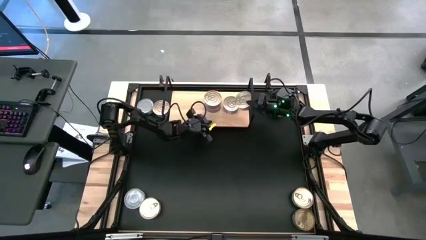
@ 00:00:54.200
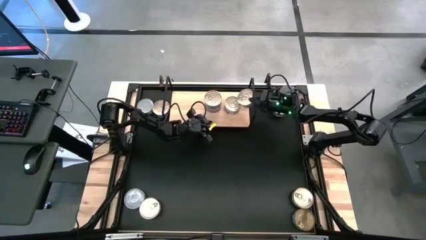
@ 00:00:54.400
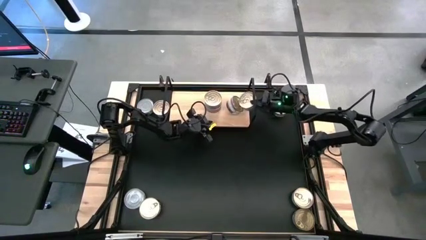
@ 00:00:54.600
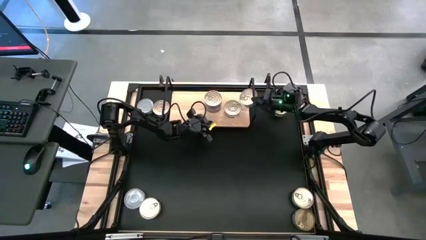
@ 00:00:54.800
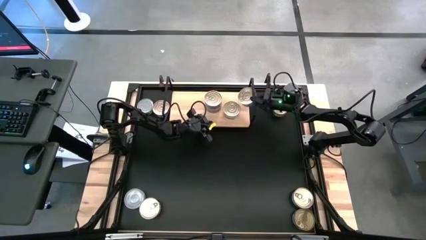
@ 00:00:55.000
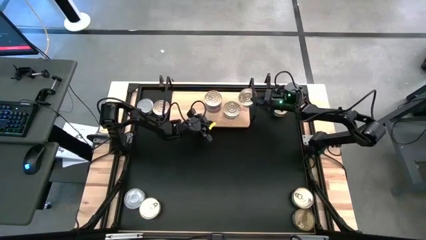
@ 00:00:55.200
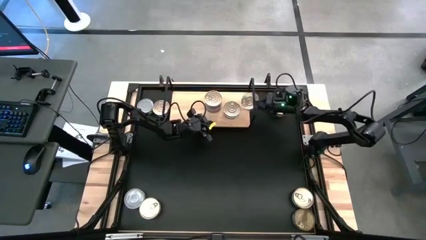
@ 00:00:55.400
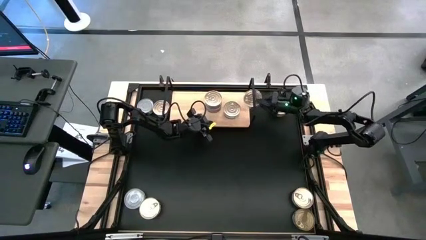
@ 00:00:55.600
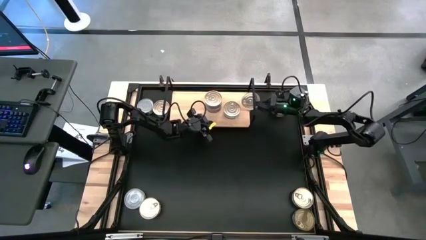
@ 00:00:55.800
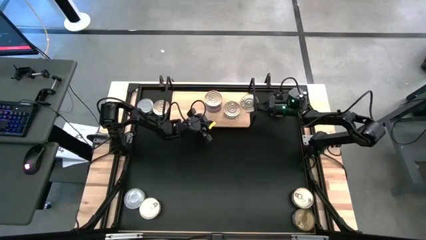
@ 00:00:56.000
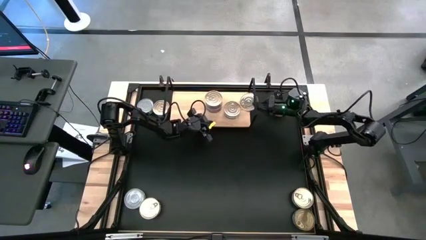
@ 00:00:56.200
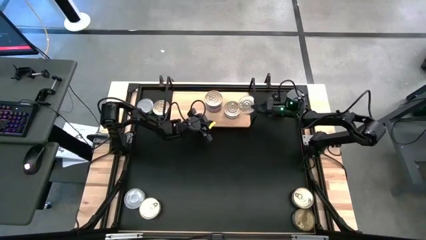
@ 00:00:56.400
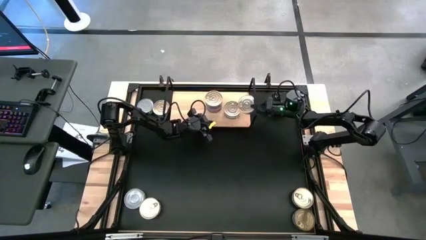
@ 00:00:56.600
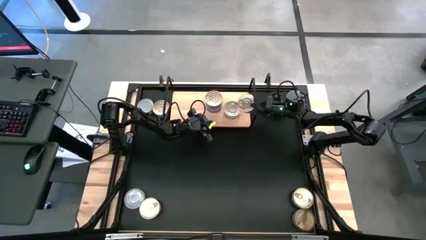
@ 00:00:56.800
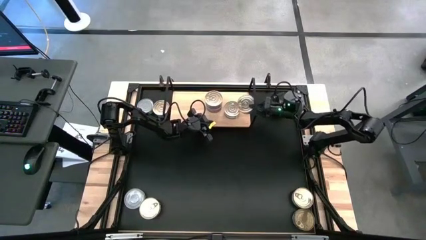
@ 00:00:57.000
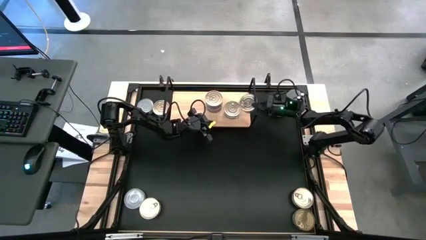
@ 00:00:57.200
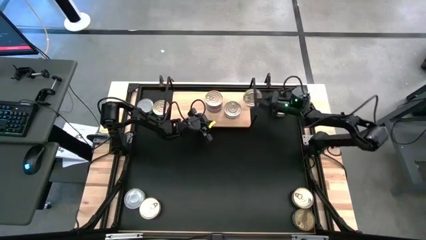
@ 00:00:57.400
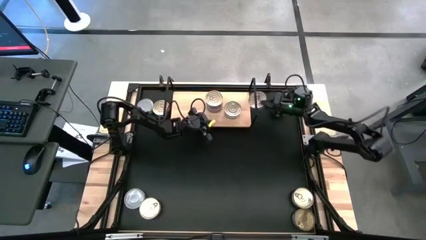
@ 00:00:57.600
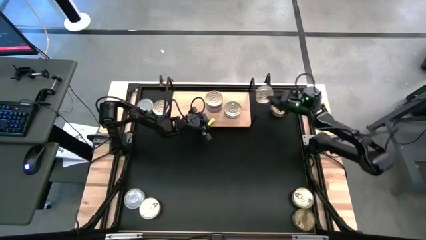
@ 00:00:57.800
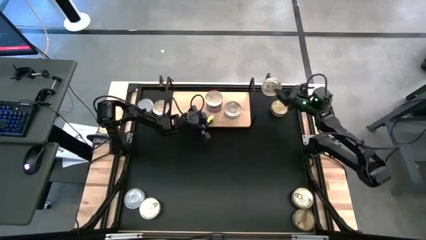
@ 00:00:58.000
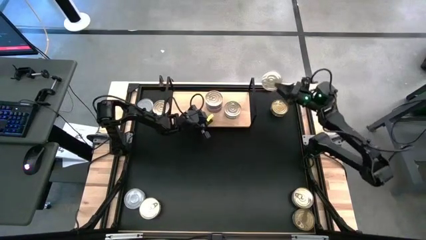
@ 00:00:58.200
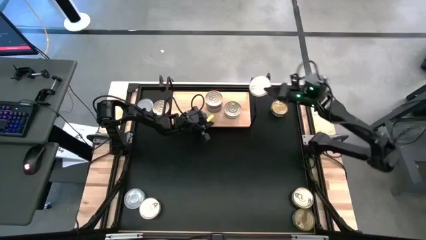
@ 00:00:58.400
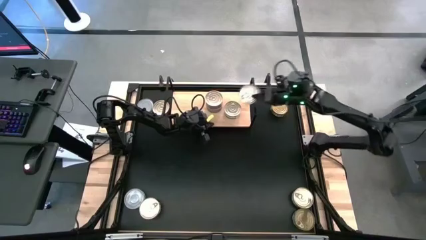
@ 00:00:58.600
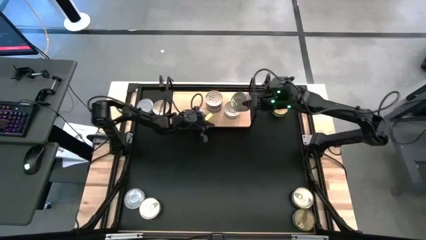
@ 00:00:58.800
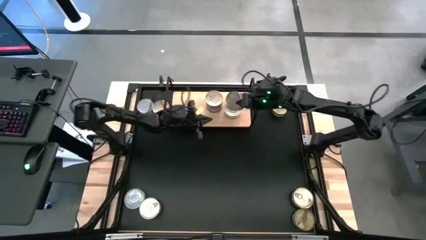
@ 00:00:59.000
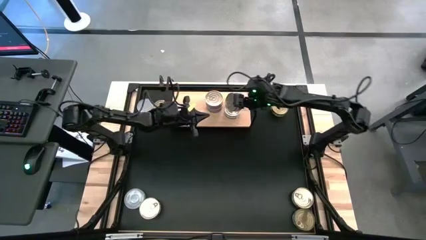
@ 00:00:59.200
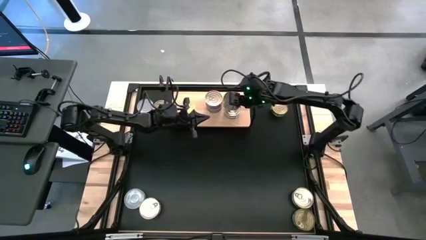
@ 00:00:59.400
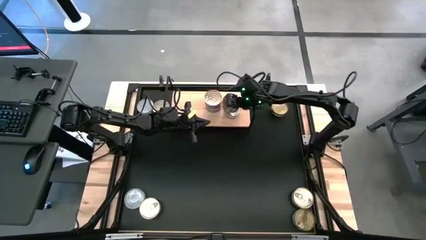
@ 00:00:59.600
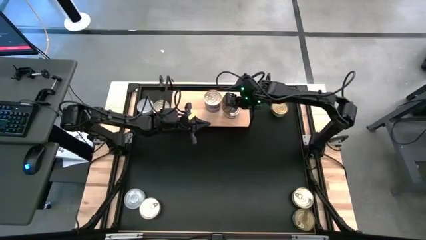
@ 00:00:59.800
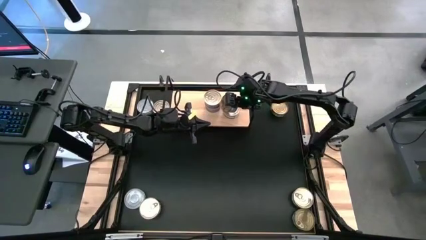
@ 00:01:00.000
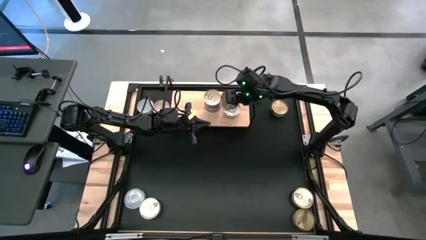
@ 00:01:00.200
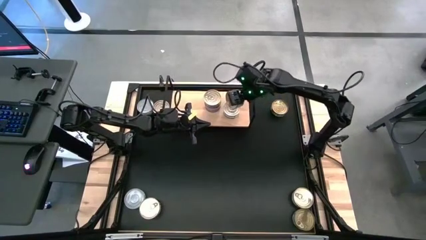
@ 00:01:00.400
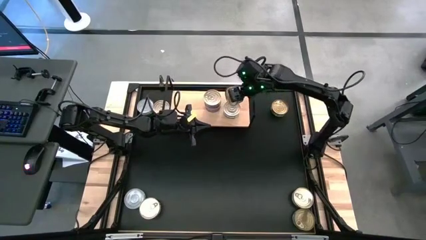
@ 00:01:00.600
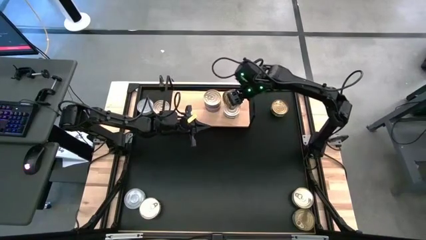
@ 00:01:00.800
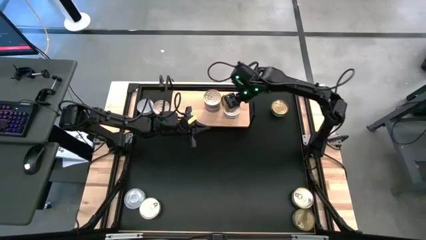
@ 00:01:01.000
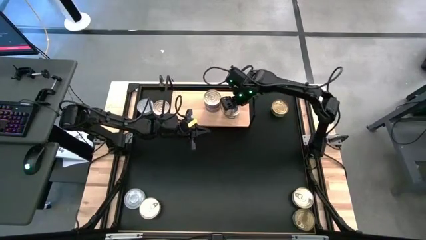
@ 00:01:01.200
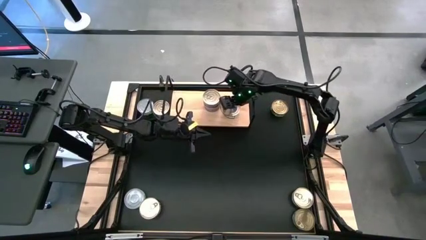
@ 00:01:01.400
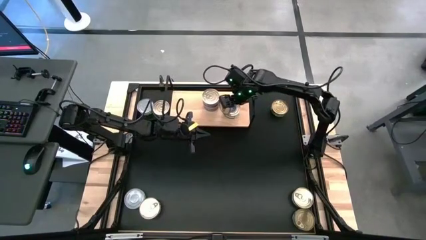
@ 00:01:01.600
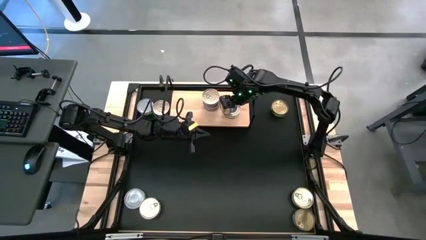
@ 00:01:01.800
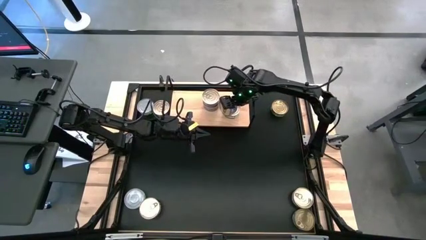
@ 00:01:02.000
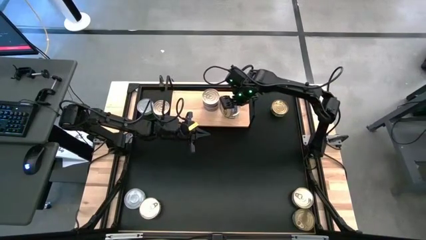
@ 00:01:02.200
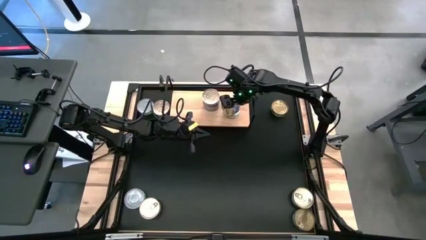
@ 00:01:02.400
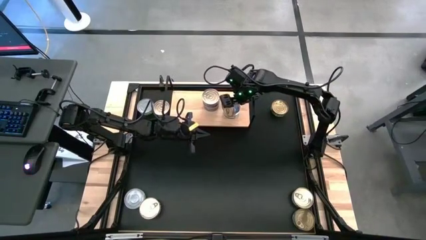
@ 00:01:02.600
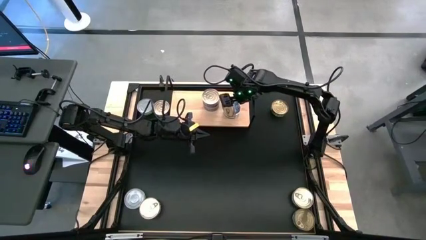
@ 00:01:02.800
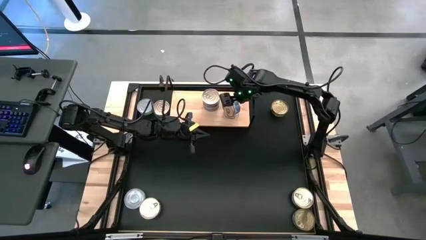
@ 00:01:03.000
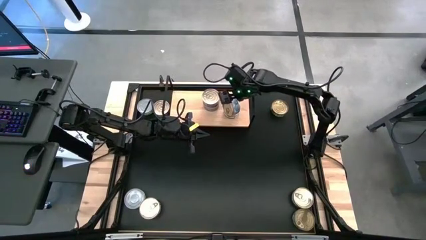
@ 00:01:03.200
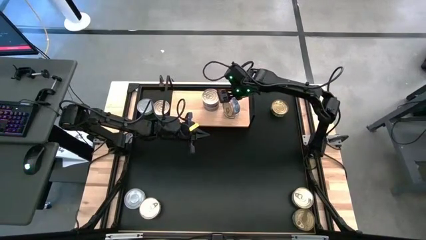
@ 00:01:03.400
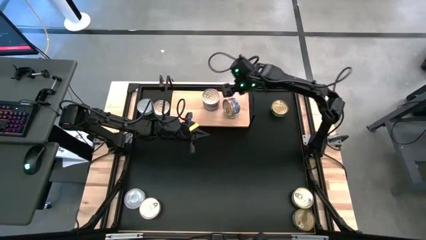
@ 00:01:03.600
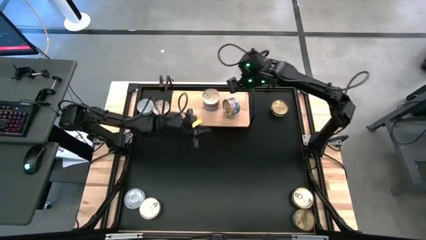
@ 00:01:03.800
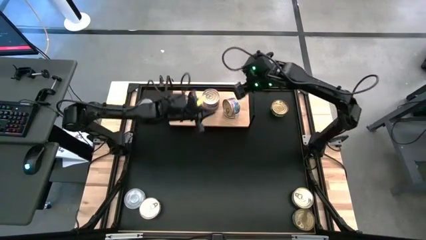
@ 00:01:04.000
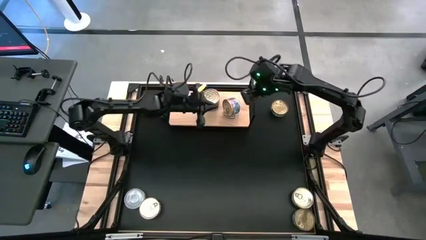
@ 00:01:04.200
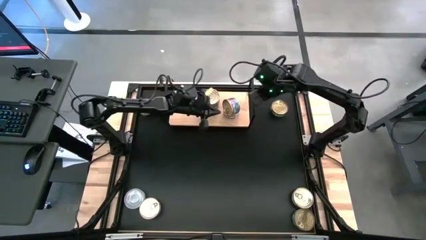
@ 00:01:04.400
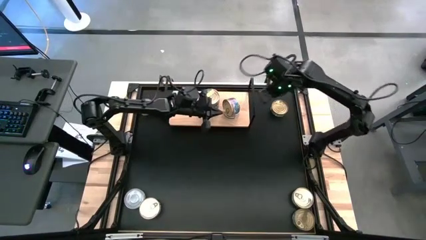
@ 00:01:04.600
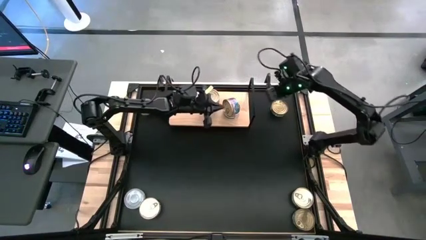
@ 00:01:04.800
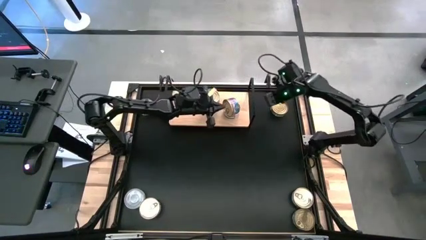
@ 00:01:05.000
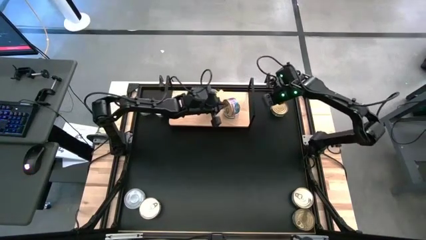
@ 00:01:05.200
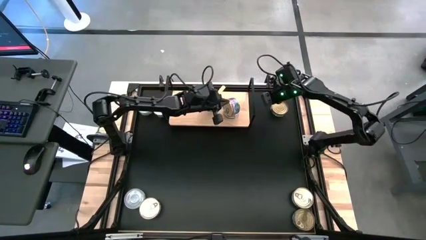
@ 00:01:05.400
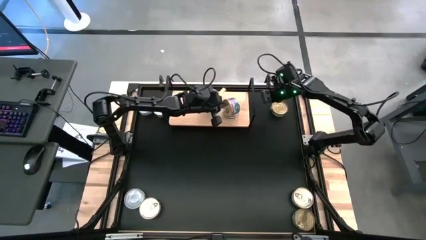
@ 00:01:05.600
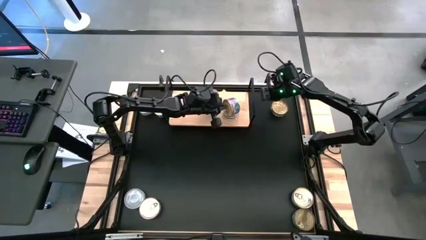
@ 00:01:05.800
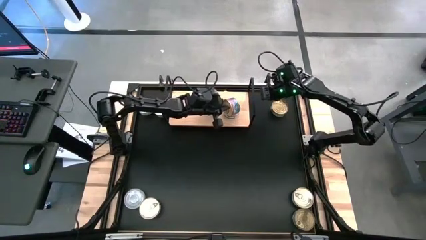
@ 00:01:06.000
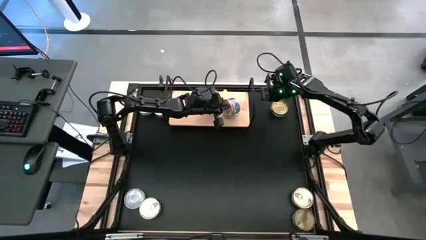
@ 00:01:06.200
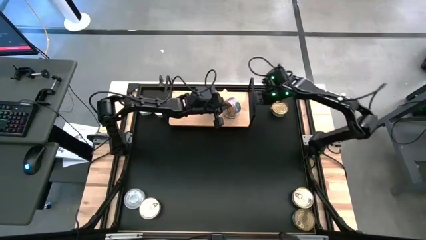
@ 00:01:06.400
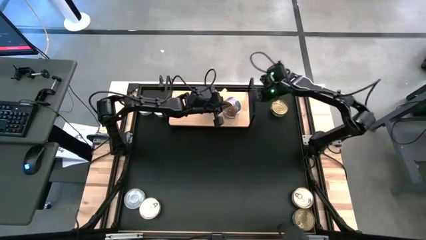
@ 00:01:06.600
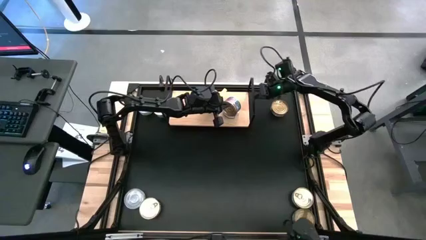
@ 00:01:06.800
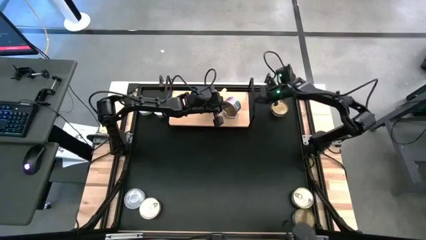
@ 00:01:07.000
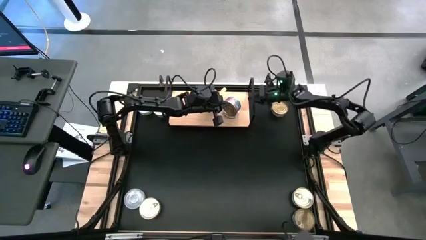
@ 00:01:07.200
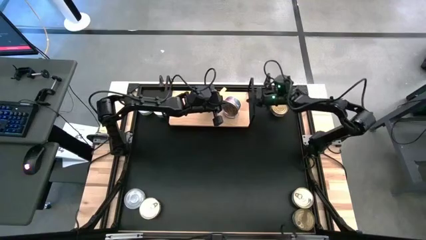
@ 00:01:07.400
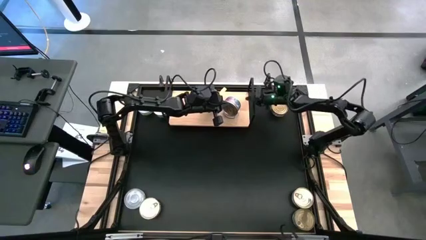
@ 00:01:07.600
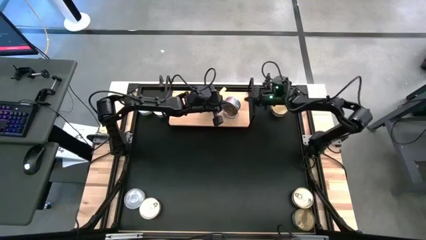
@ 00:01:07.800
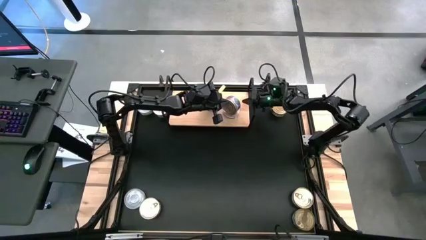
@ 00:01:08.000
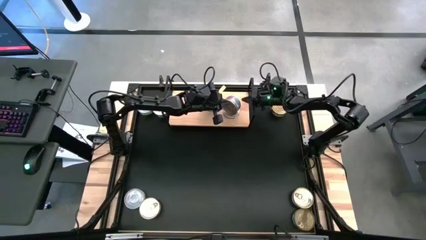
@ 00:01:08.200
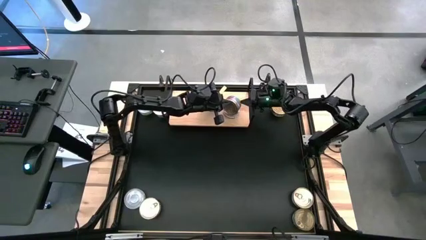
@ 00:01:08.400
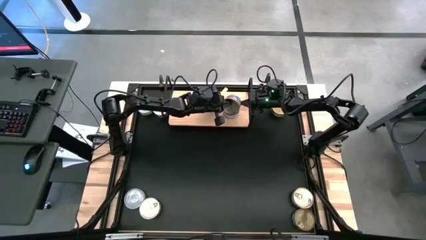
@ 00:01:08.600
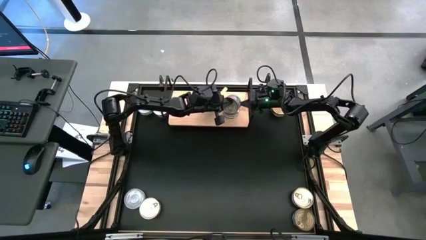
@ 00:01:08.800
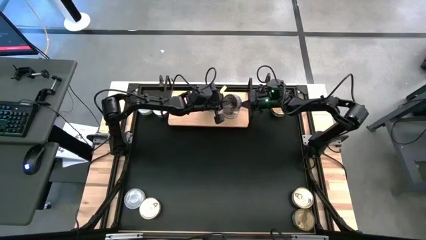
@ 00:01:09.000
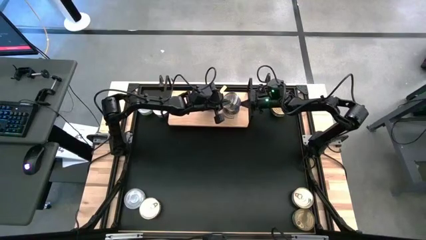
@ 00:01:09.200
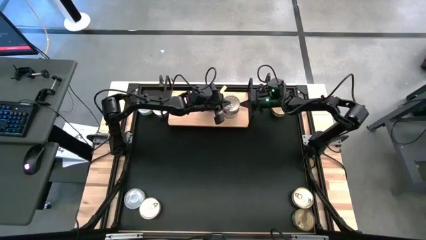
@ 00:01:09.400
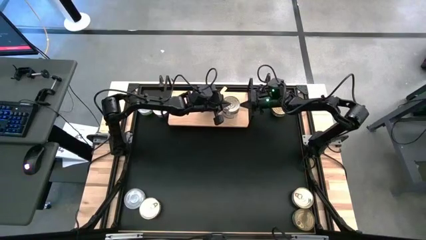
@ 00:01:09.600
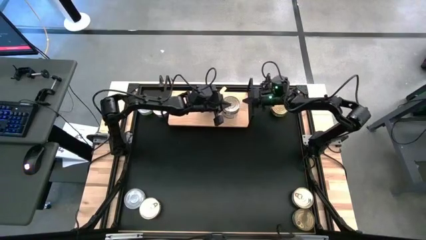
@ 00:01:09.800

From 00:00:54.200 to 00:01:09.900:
Task: Stack canned seafood by type on shelf
Stack the left blue-pink tuna can on top of the other blue-pink tuna can on the shelf

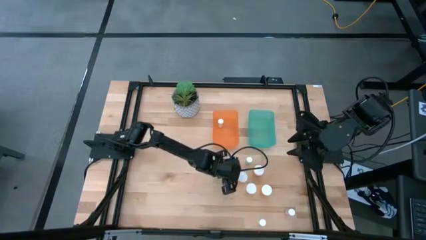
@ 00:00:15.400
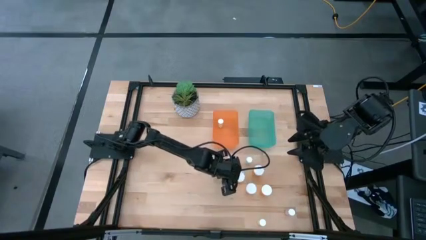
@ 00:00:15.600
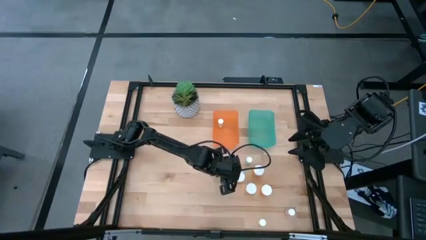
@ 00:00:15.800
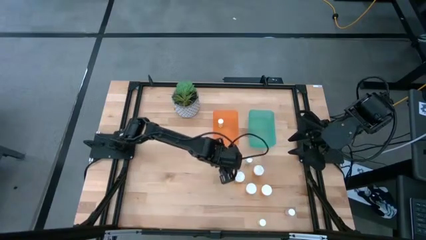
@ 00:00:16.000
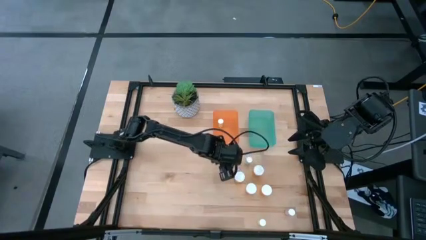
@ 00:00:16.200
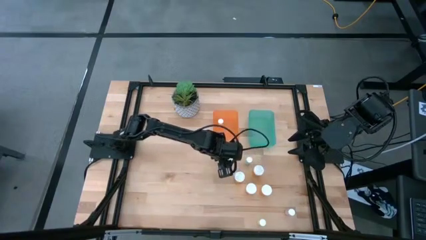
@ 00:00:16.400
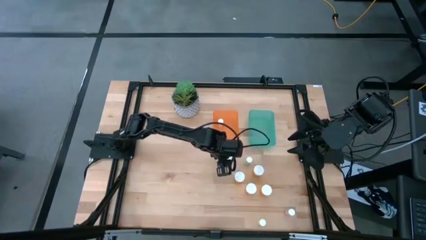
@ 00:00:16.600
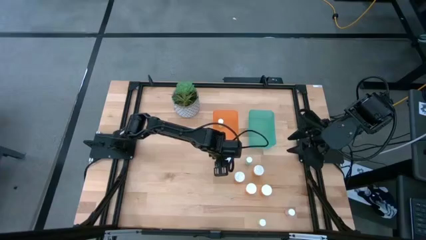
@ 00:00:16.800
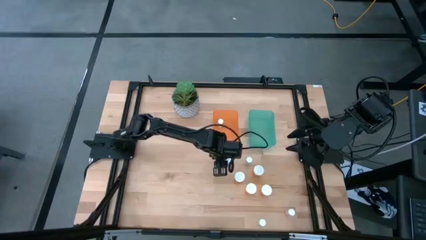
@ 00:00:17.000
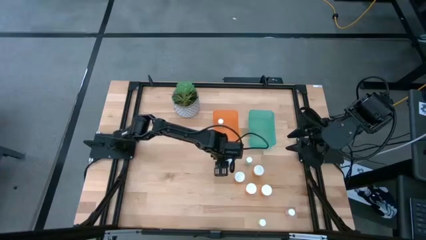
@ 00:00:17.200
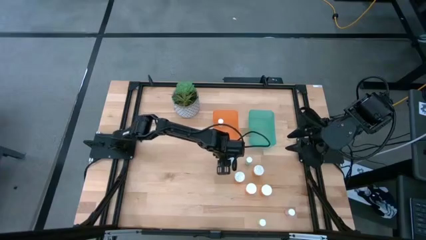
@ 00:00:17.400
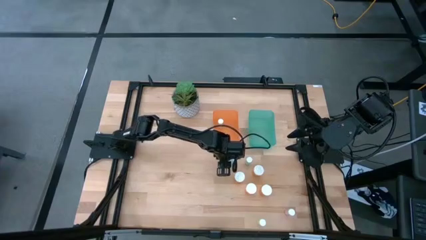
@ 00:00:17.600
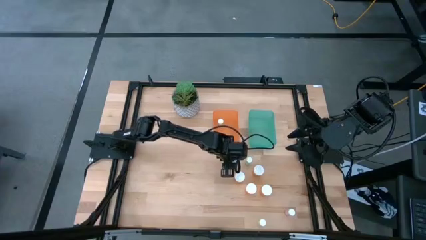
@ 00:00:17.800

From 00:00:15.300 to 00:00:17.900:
Task: Pick and place medicine bottles into bin by pill shape (circle, oval)
Put the left small blue bottle into the orange bin
